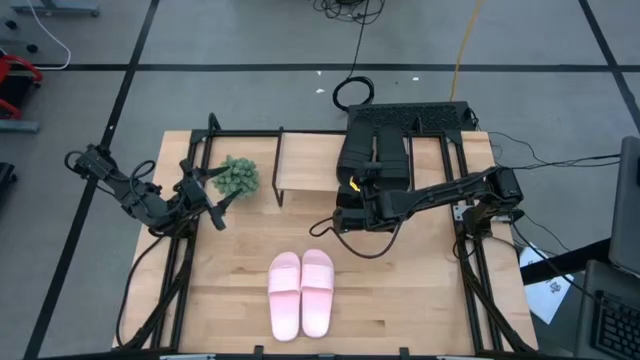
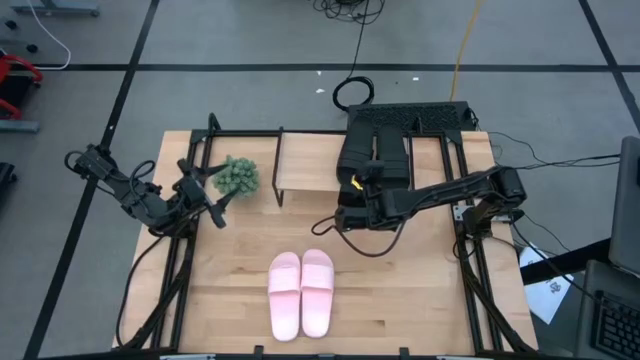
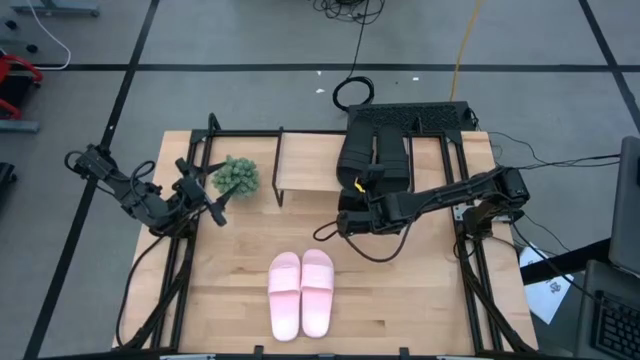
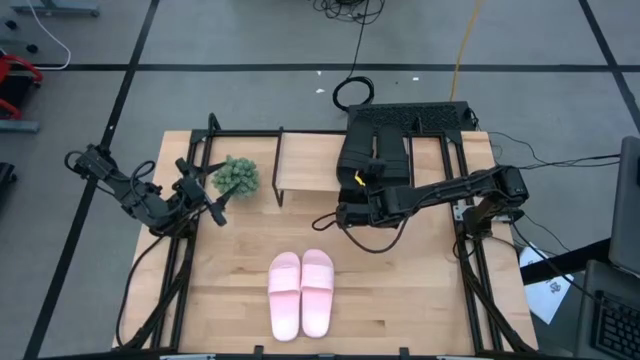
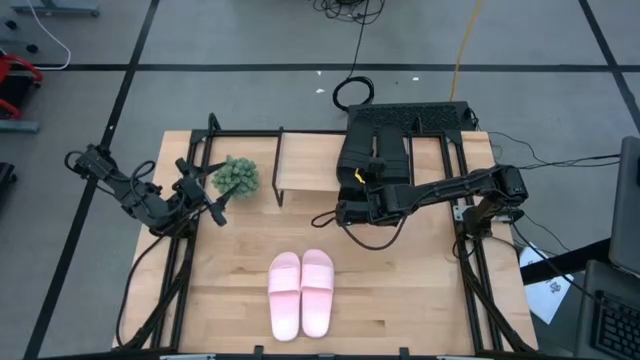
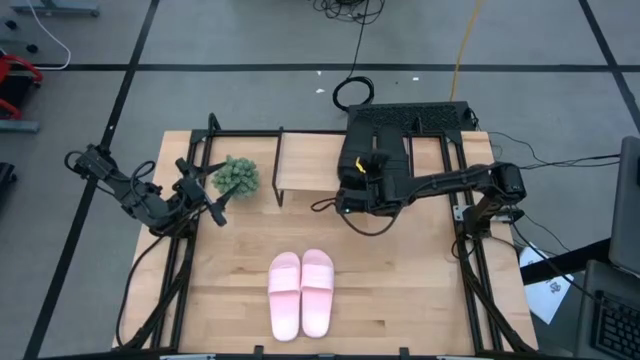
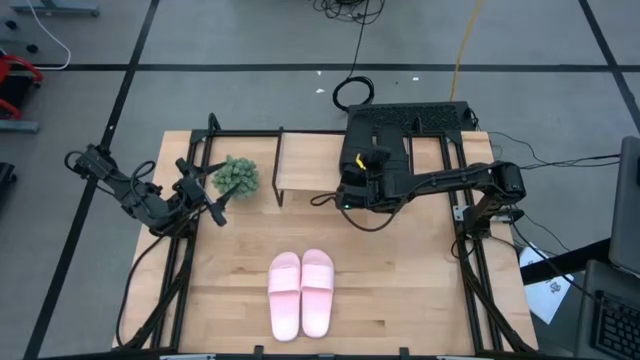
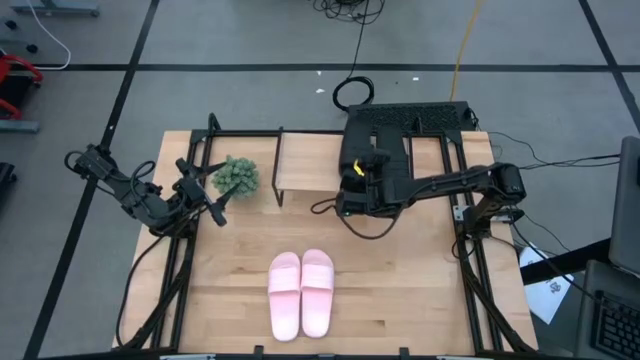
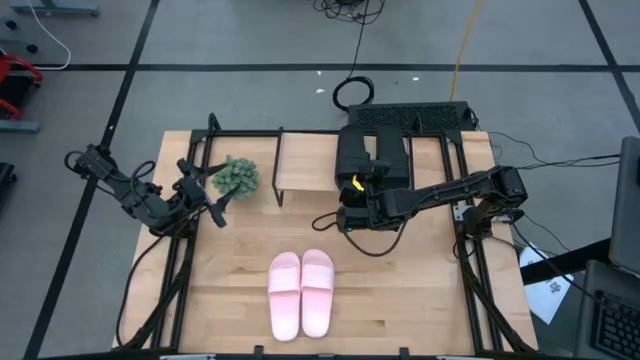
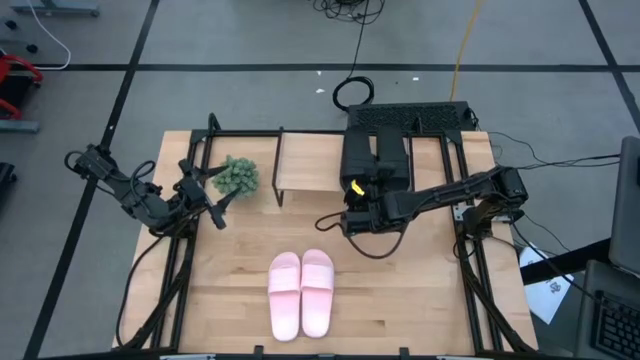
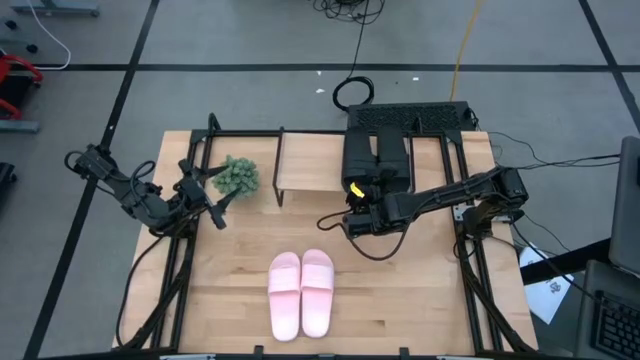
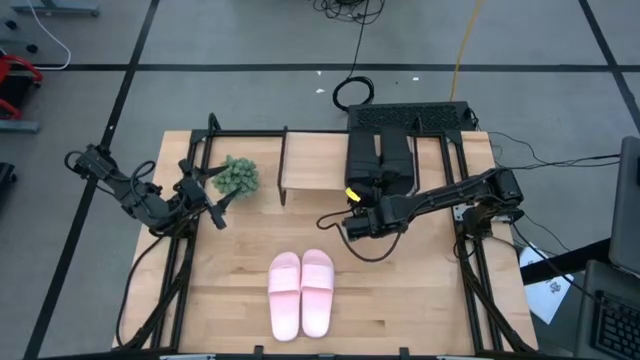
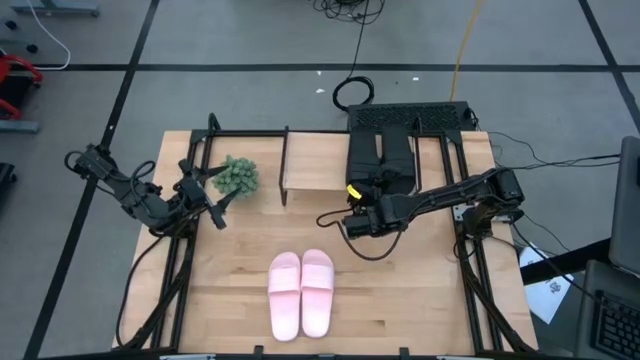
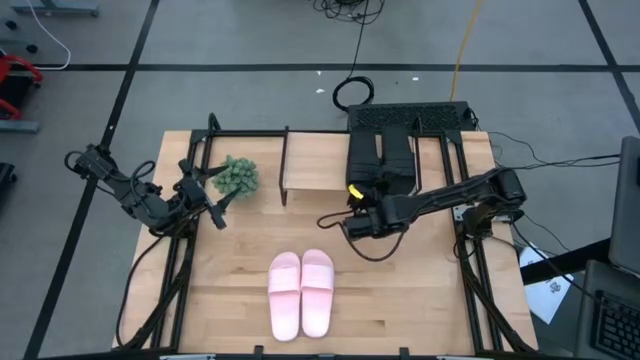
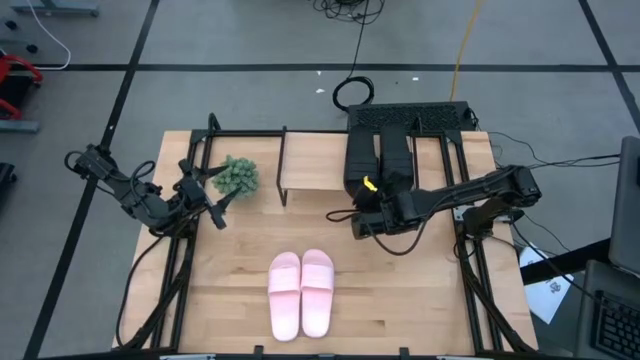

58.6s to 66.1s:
Task: Pick and place slides into the shelf
Adjust the black slipper on the shelf

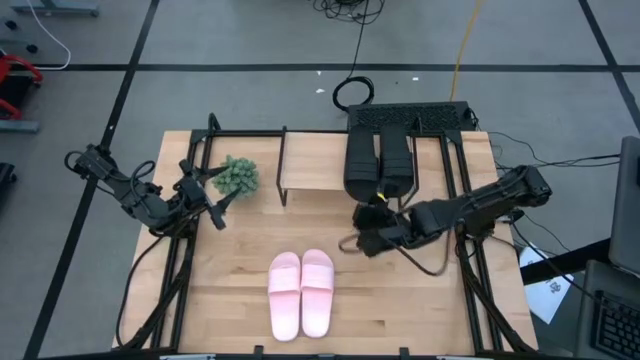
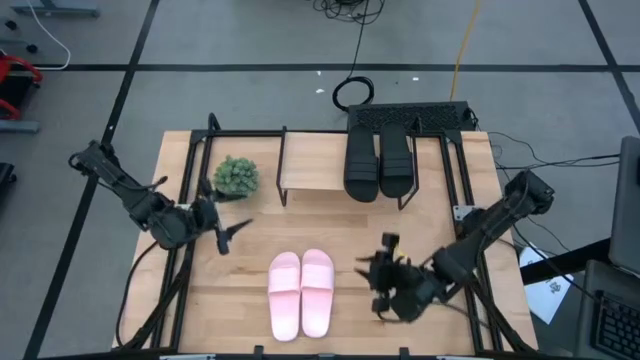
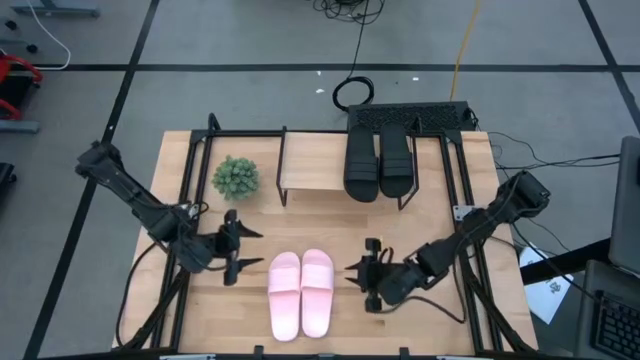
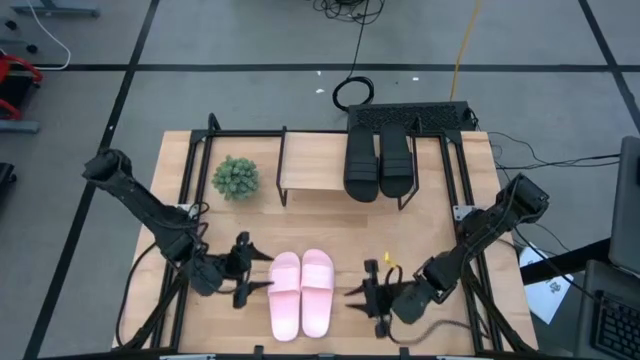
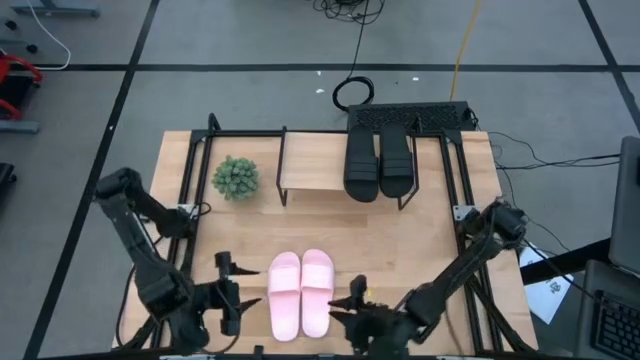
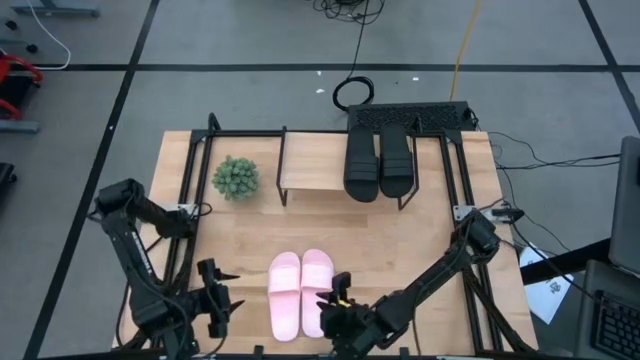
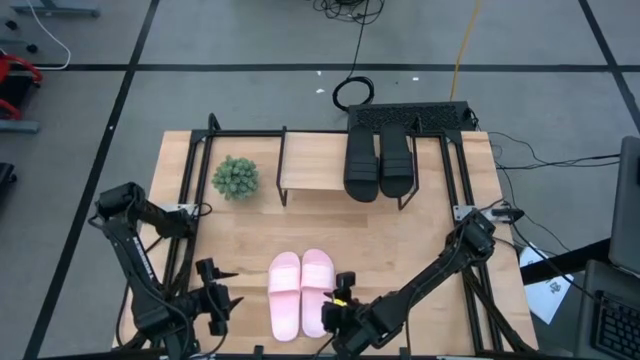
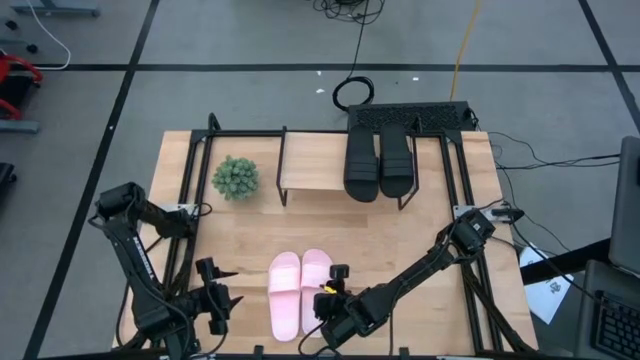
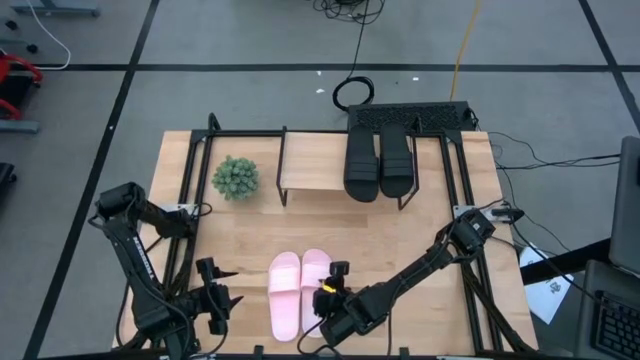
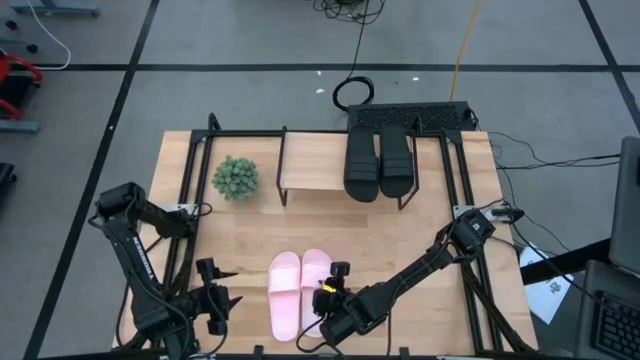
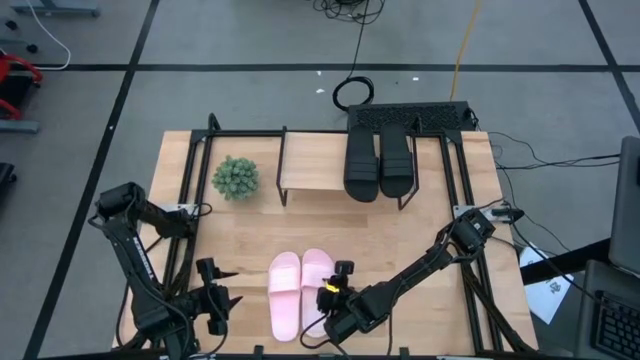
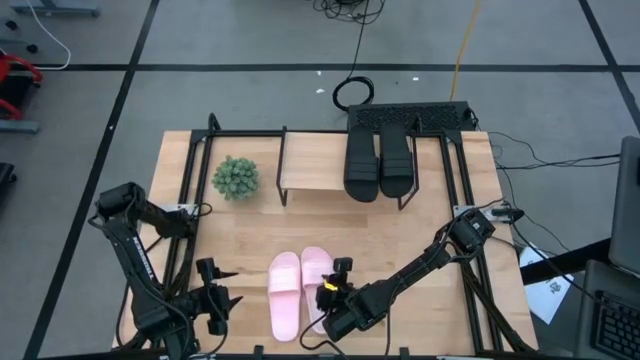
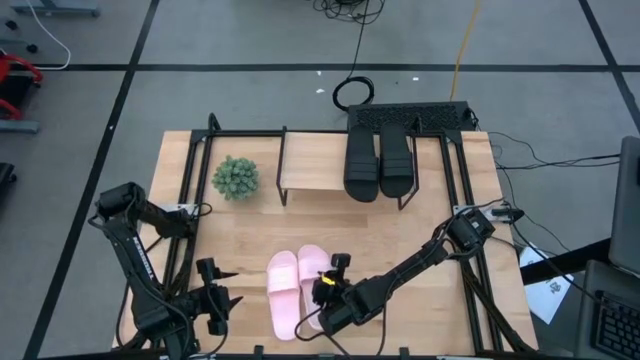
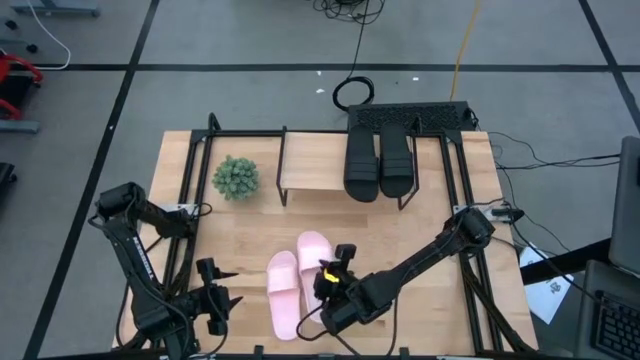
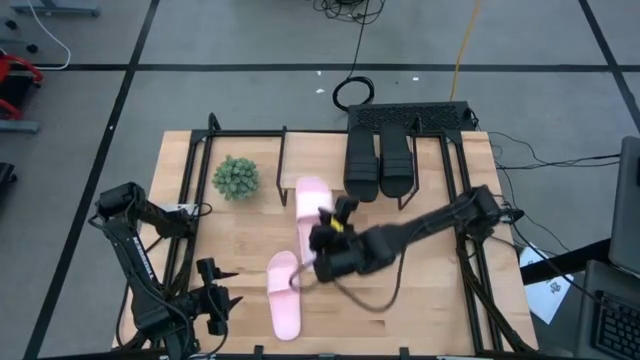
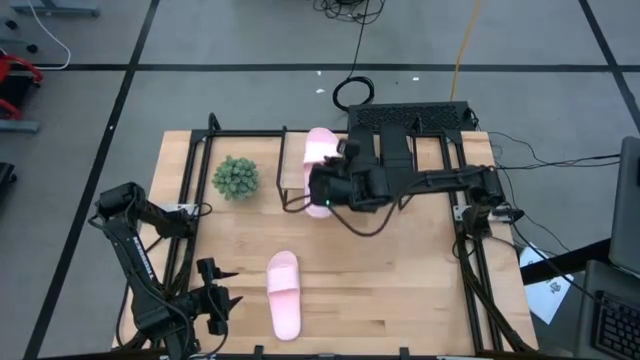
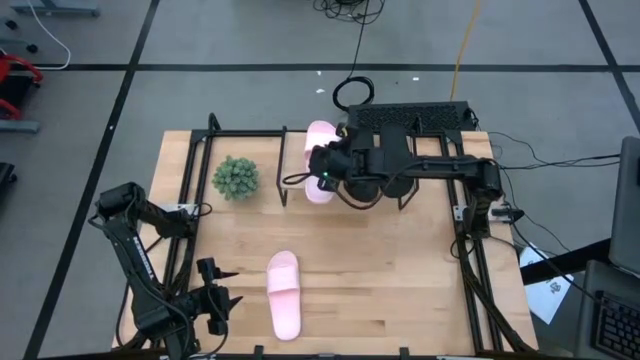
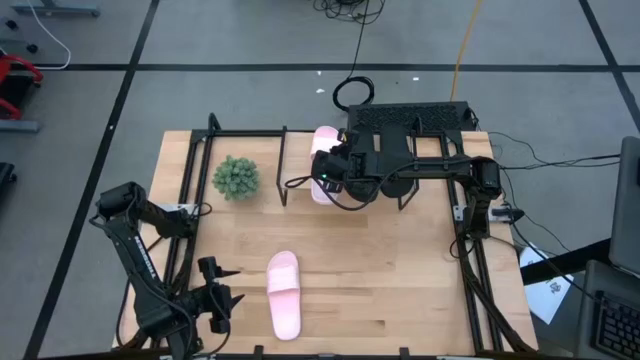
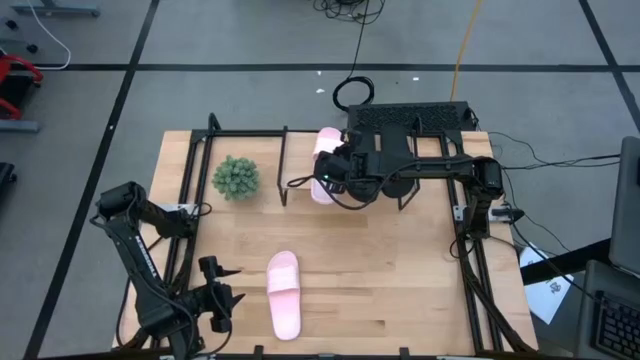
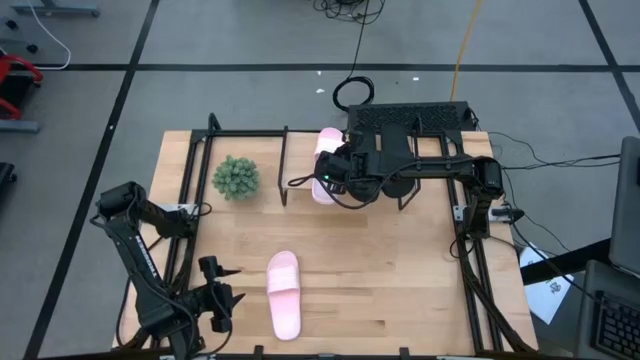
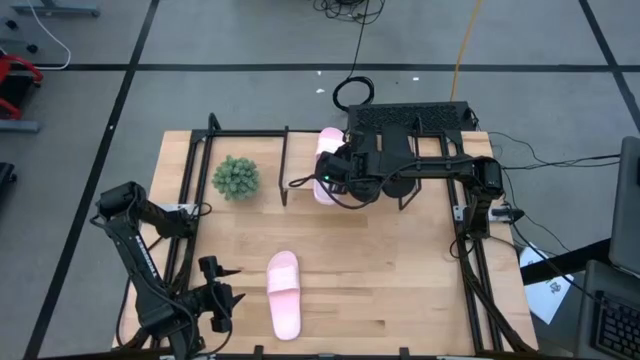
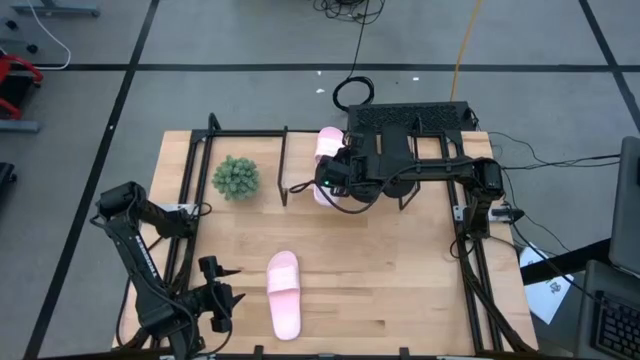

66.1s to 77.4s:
Put the right pink slipper on the shelf

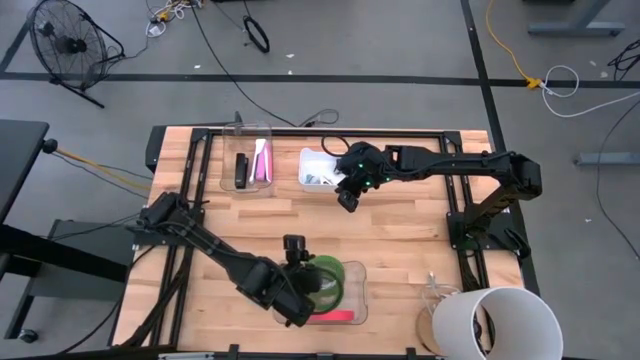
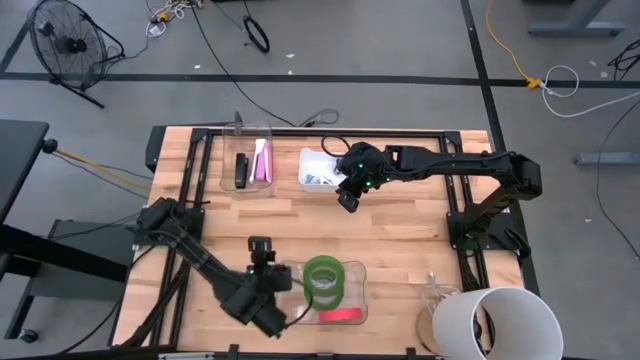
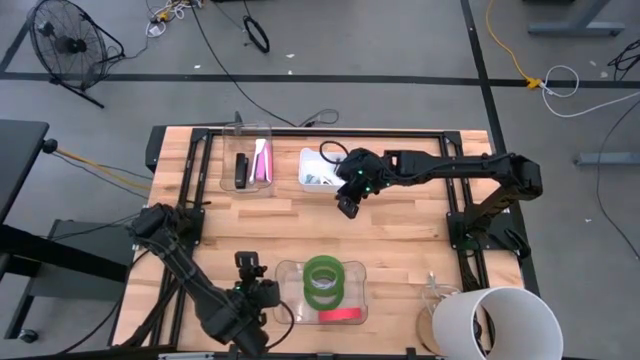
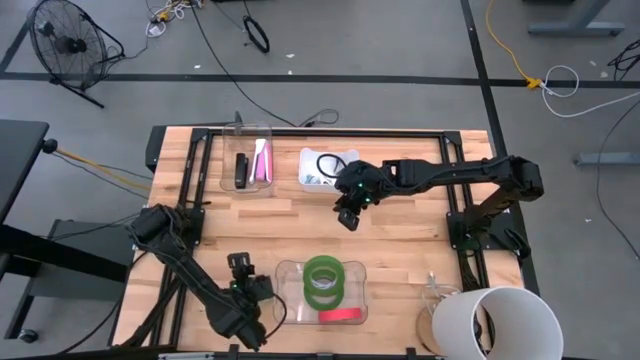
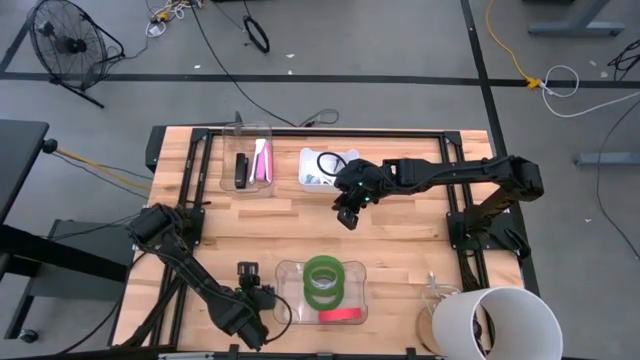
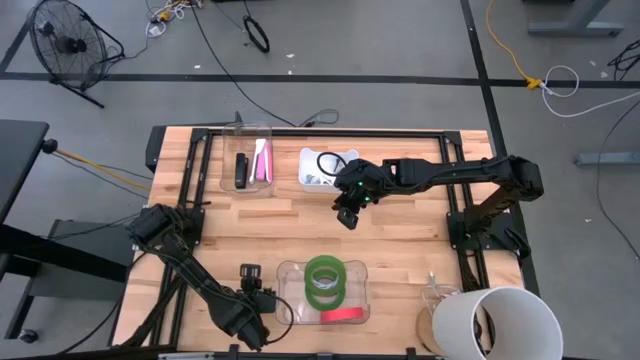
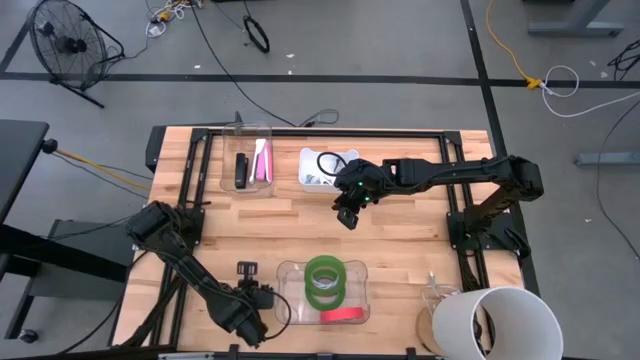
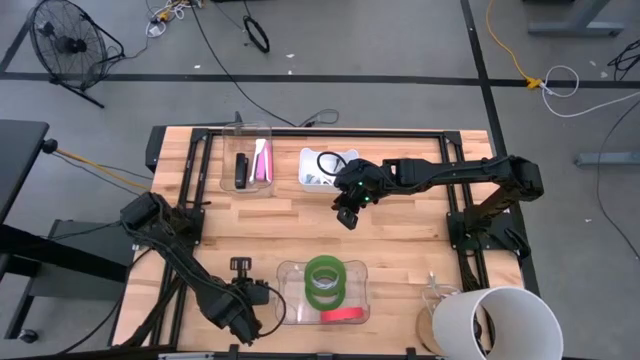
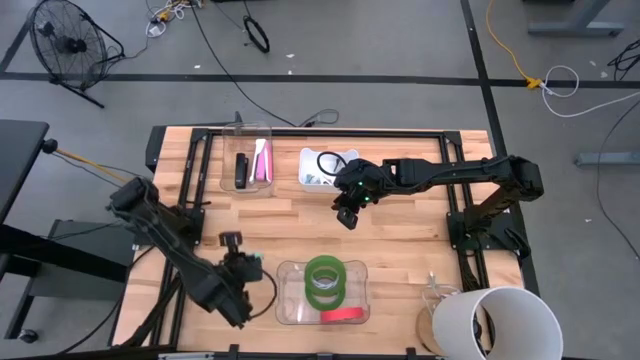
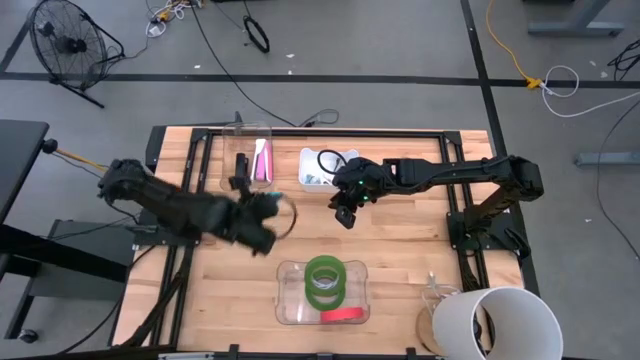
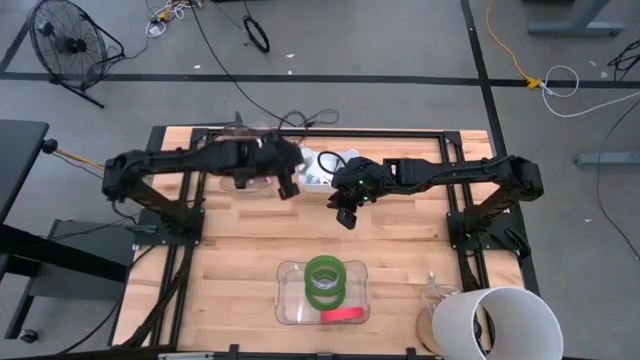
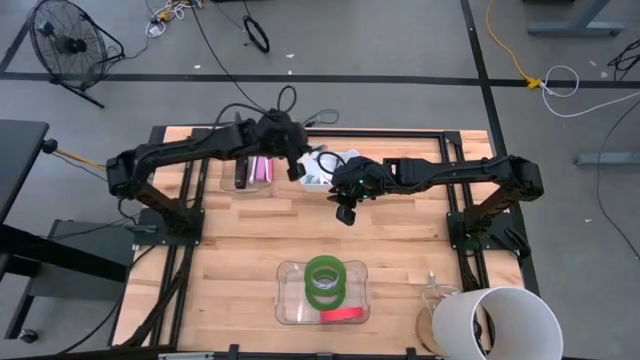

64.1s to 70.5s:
Task: Pick and place Stapler, Stapler remover, tape
Put the light blue staple remover into the white bin
